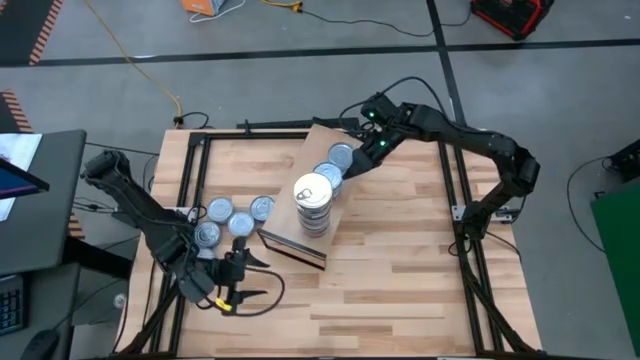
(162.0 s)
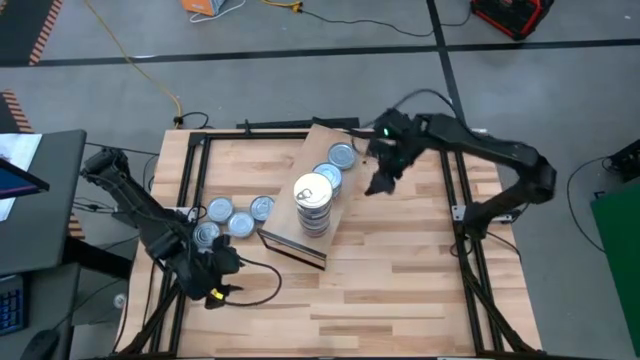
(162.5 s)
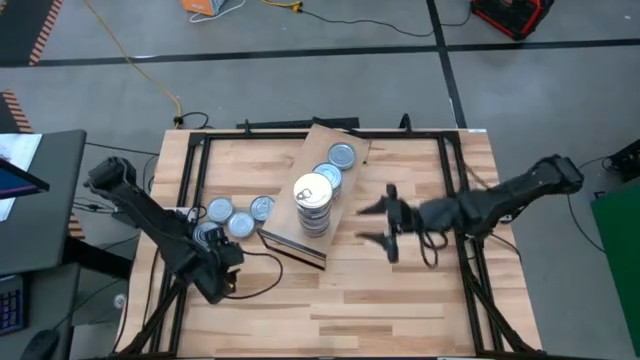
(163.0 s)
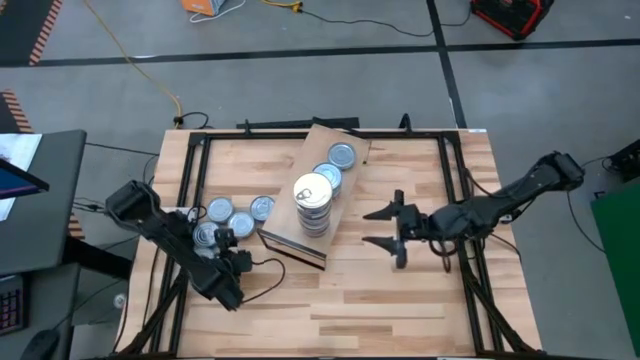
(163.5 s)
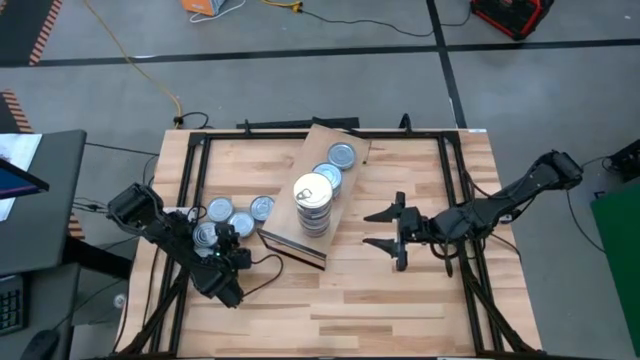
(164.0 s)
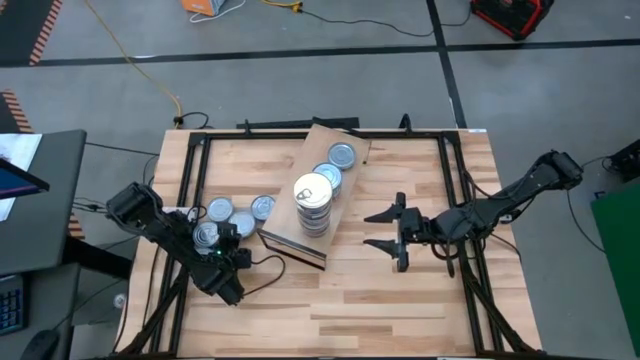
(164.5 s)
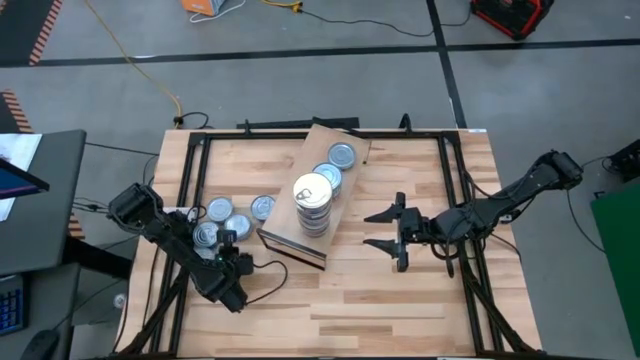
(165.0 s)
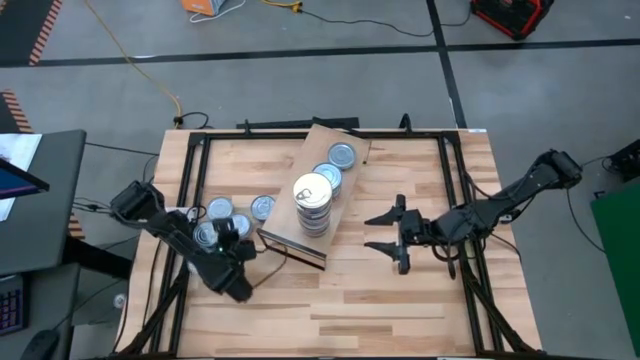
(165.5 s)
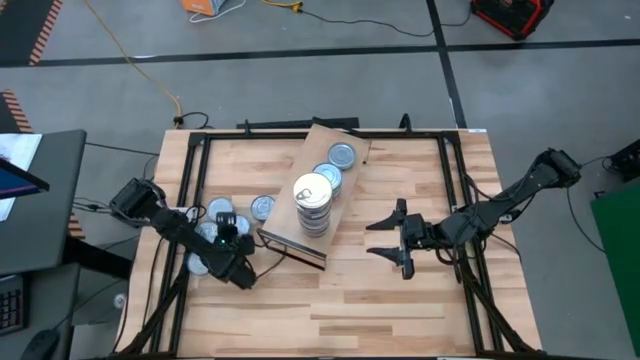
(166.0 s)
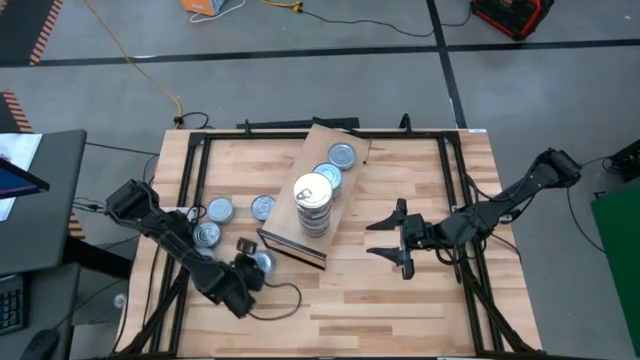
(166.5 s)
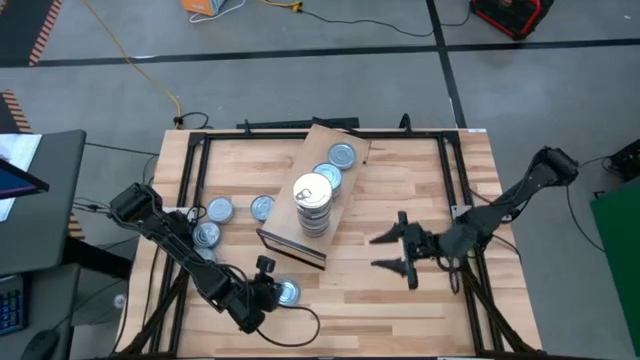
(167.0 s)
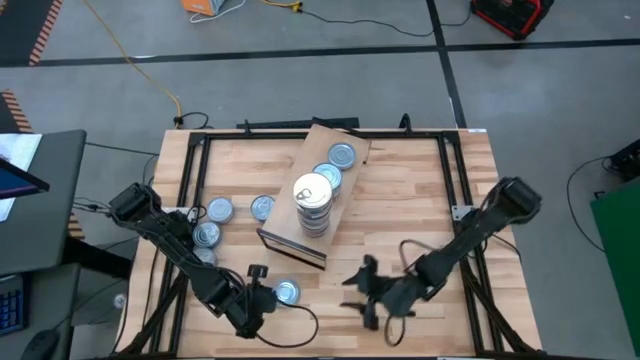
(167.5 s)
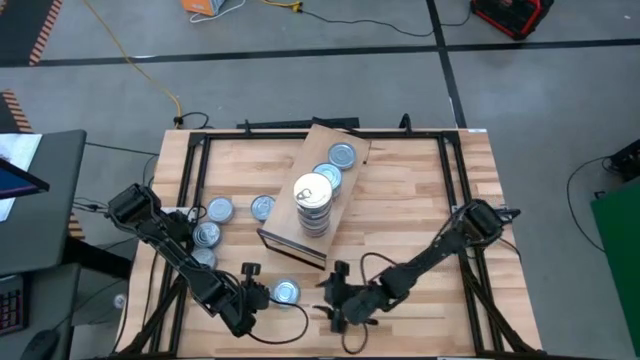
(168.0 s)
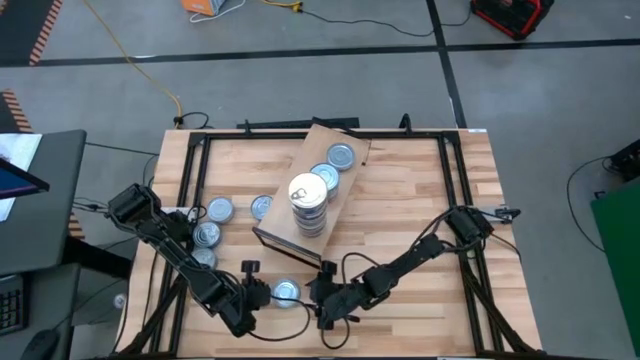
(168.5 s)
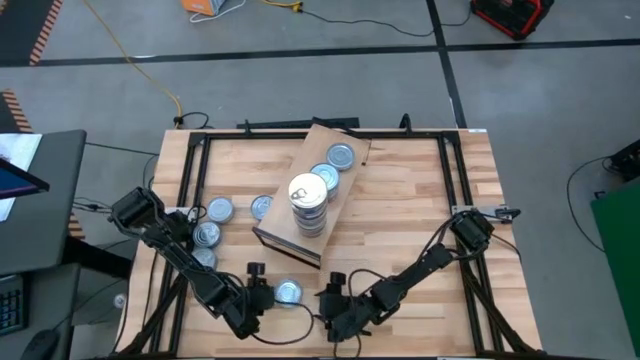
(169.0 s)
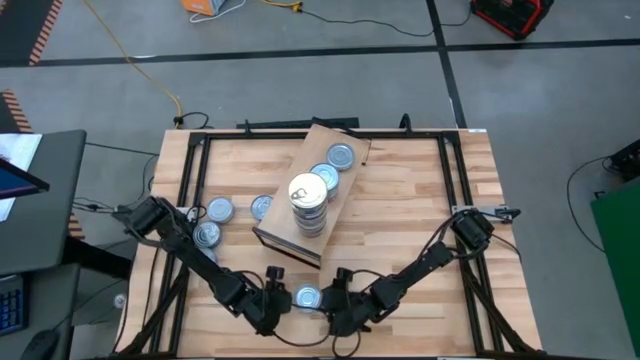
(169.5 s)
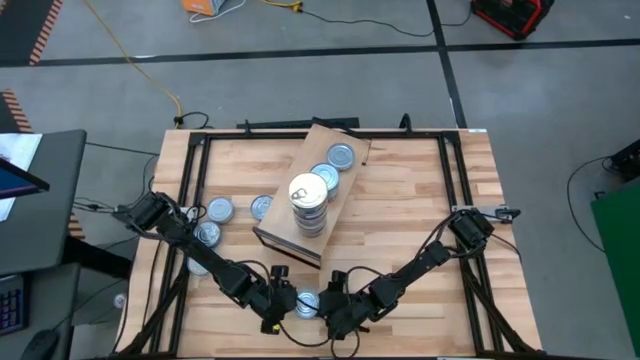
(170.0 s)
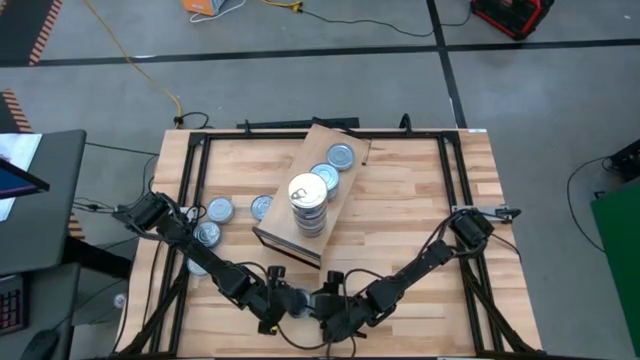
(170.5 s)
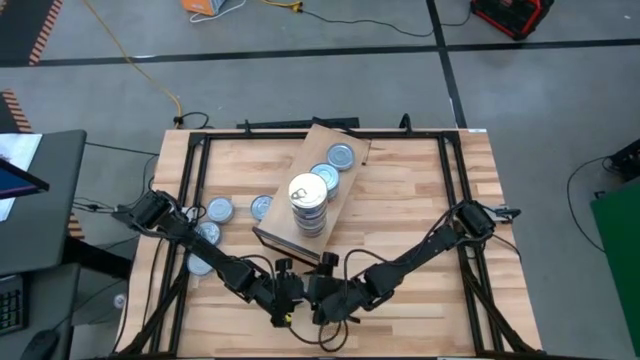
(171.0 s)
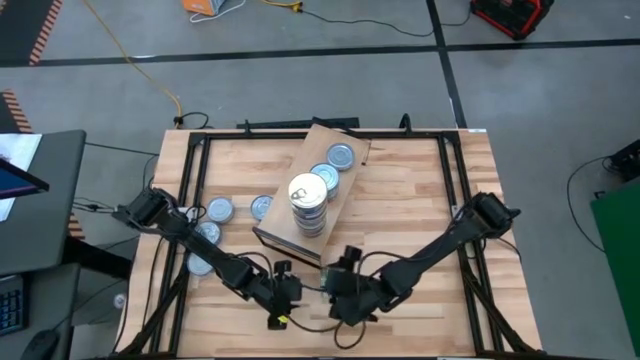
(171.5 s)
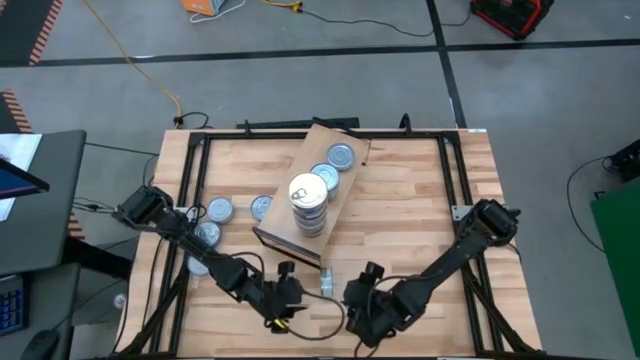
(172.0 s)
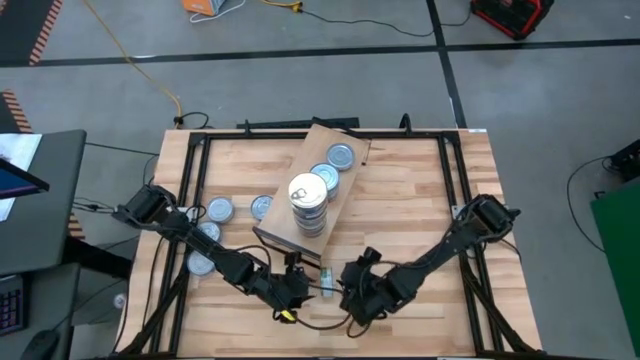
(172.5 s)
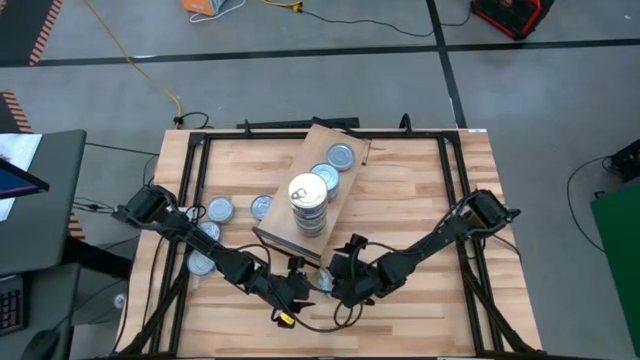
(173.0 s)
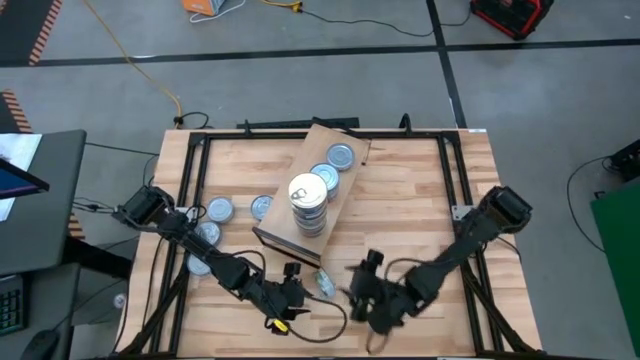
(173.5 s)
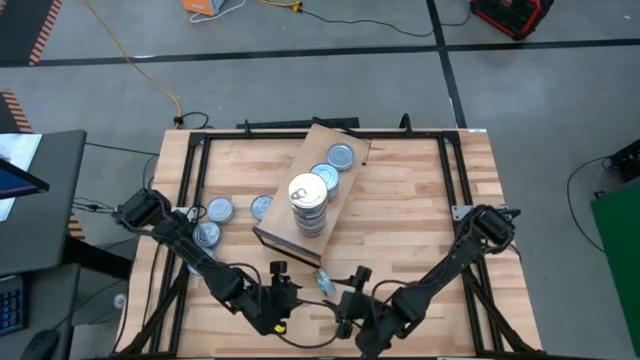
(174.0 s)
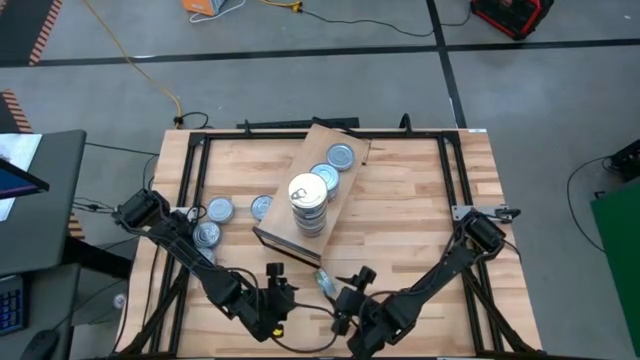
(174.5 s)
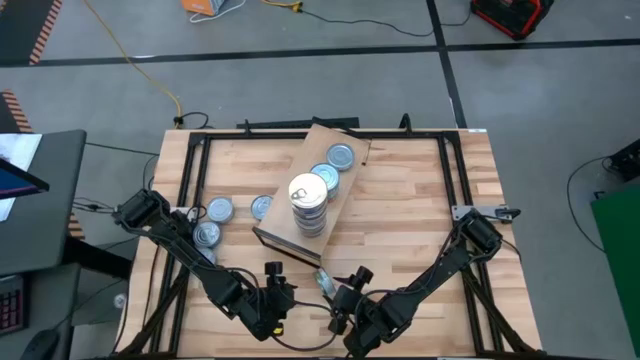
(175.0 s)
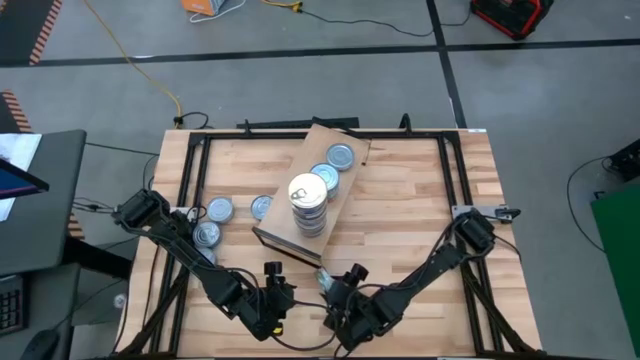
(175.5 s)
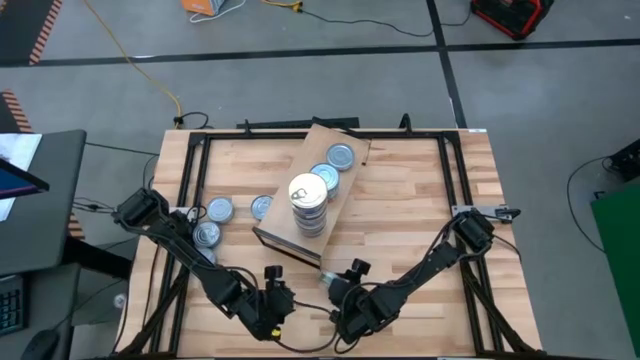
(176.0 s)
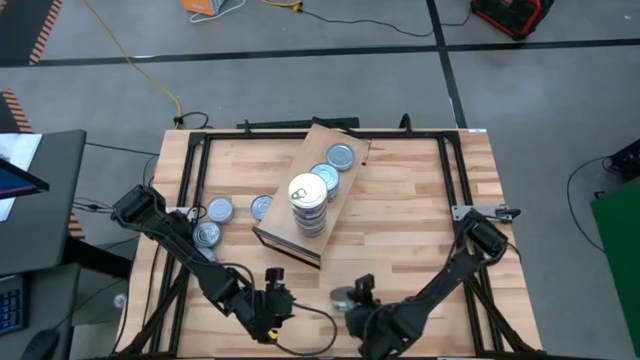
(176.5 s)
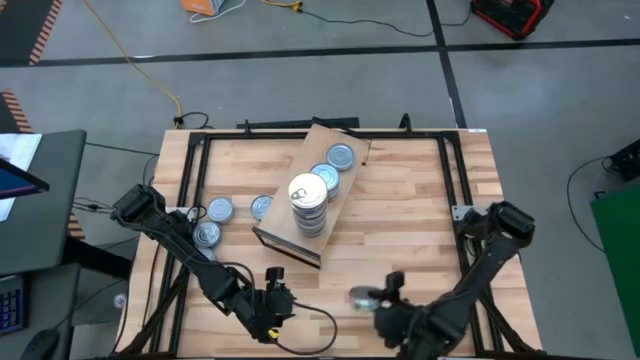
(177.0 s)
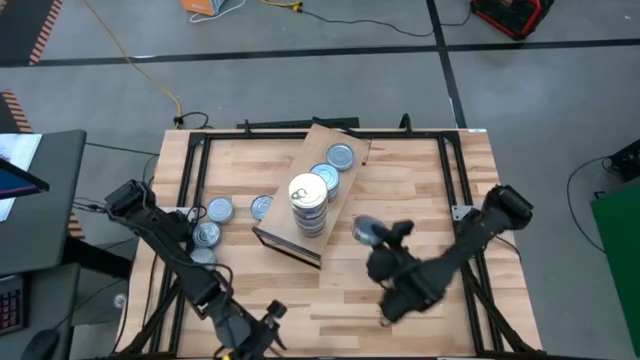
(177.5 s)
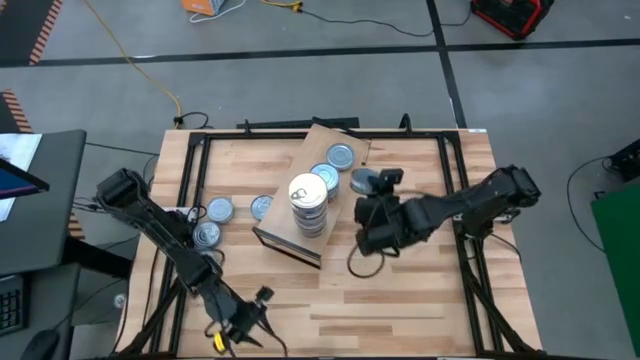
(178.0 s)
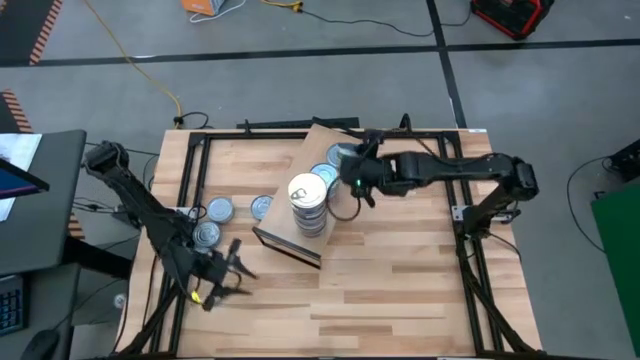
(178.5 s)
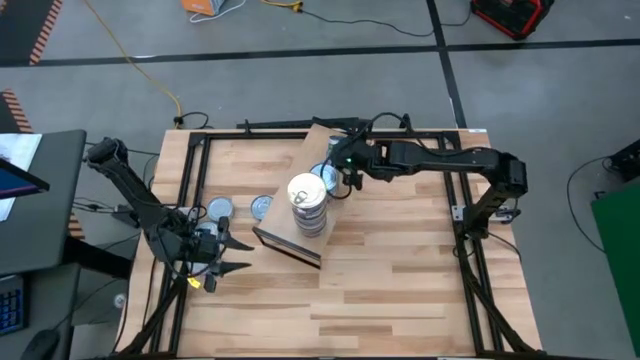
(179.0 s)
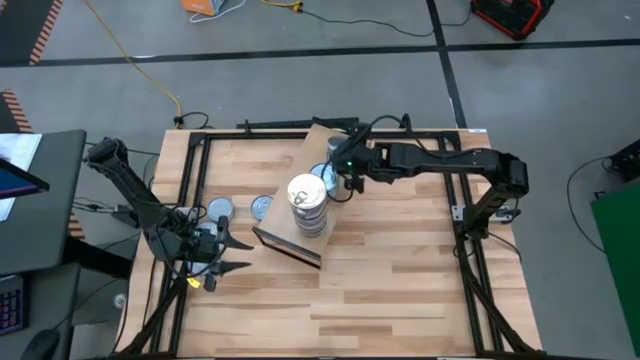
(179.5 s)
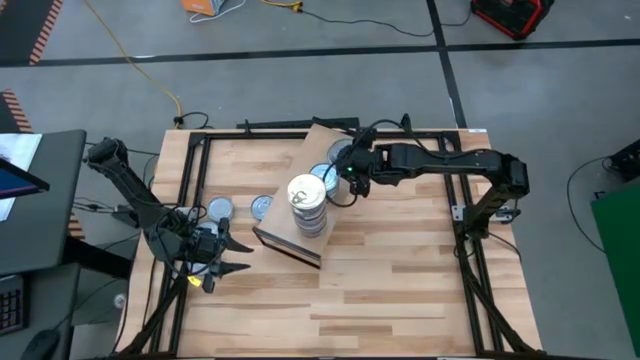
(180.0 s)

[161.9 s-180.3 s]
Task: Stack canned seafood by type on shelf
Stack the green white tuna can on top of the green white tuna can on the shelf

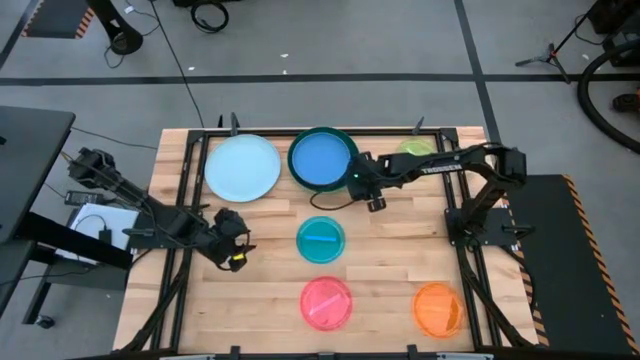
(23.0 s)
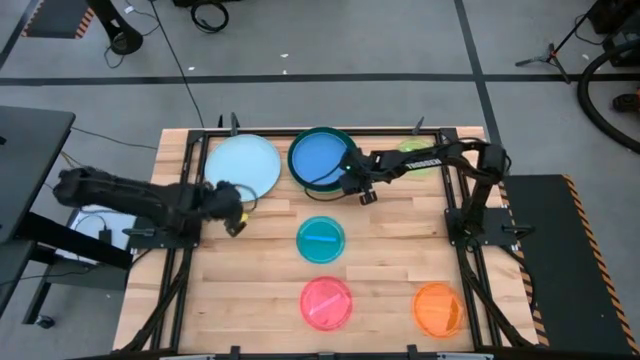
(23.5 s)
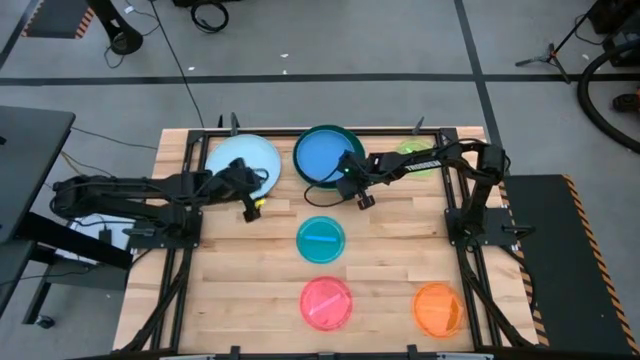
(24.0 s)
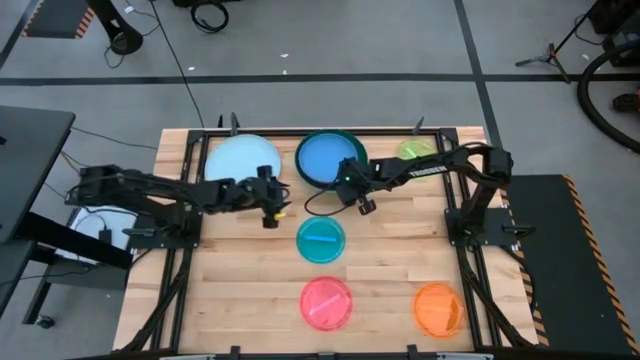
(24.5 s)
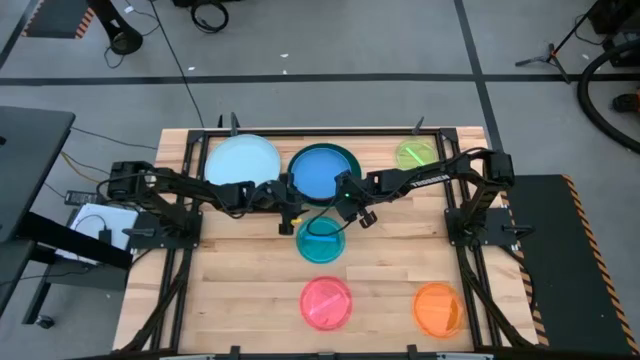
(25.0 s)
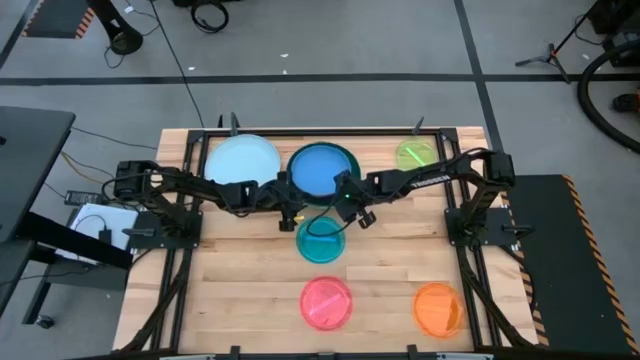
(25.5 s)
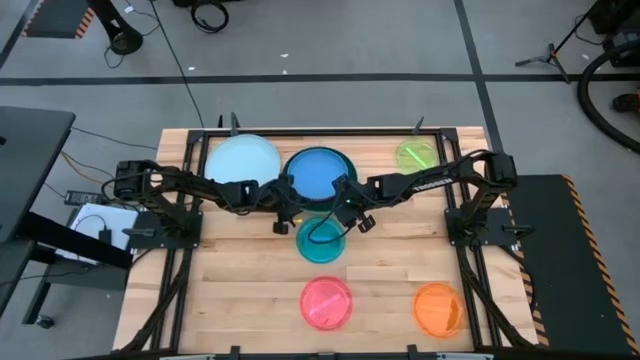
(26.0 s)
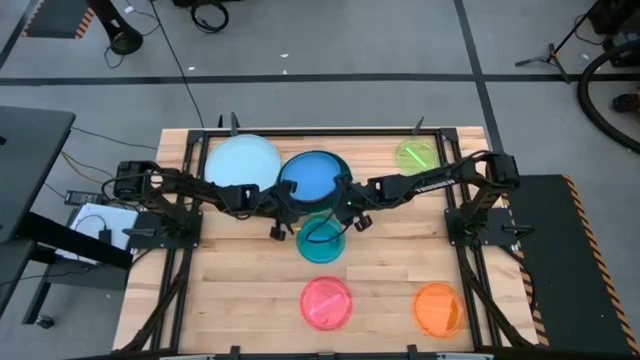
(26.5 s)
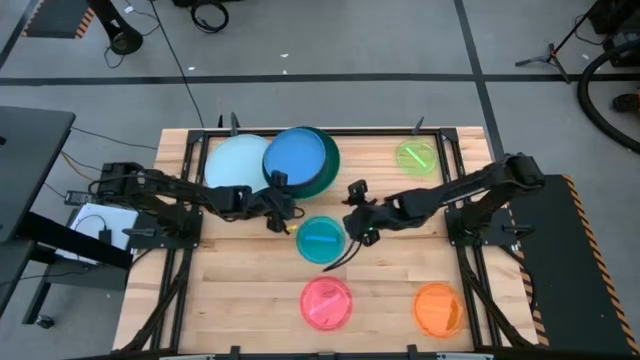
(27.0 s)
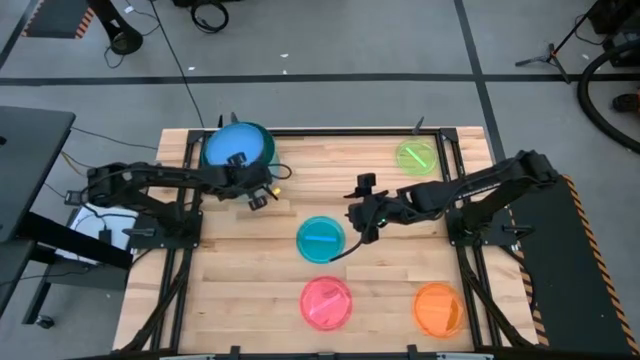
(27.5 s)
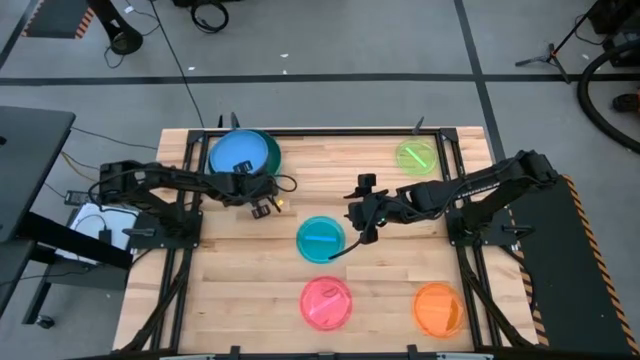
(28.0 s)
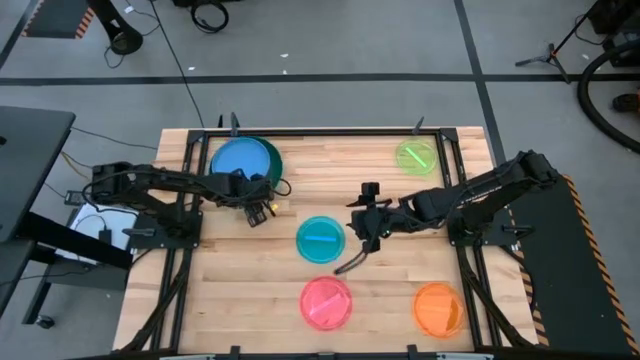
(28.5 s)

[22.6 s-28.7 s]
Task: Stack plastic plates
Stack the stacked plates on top of the light blue plate
